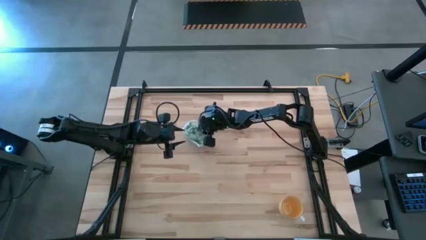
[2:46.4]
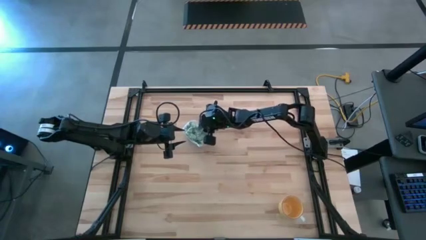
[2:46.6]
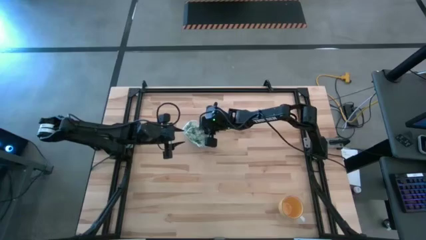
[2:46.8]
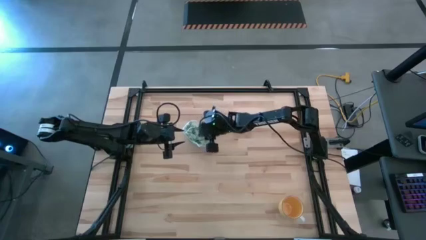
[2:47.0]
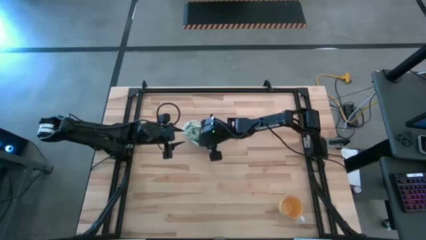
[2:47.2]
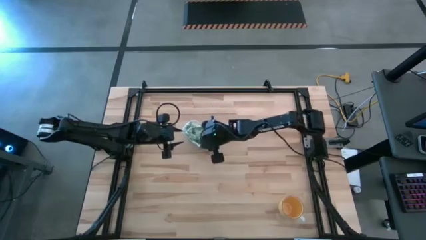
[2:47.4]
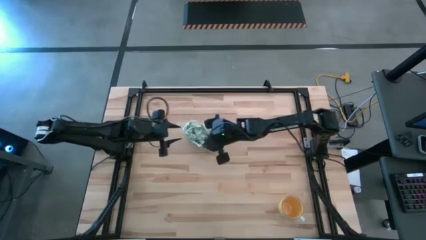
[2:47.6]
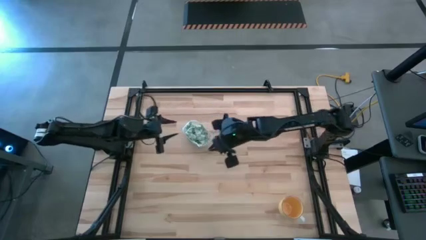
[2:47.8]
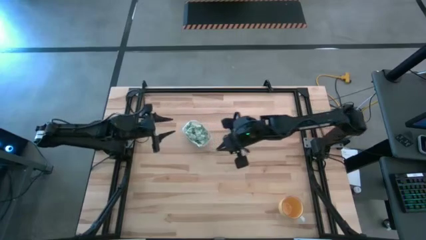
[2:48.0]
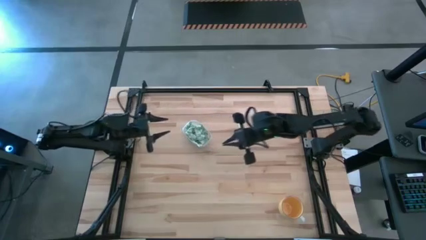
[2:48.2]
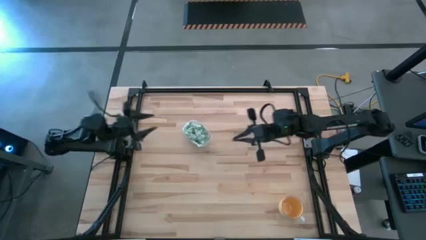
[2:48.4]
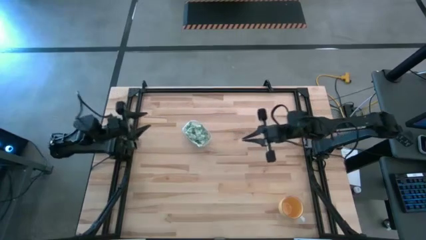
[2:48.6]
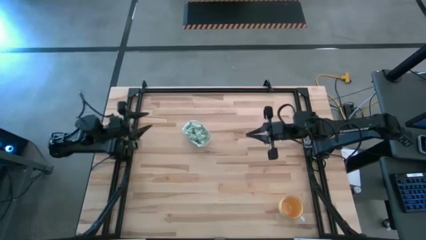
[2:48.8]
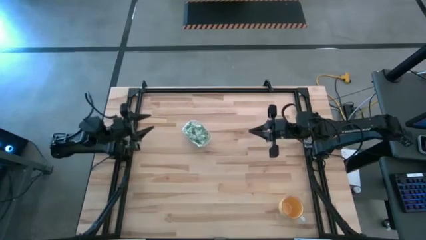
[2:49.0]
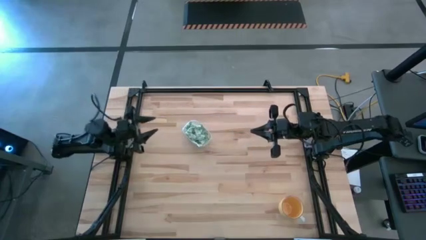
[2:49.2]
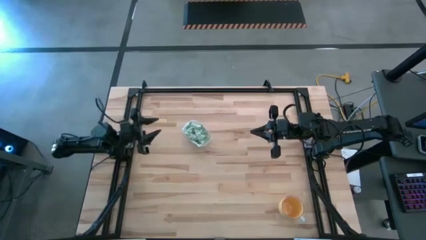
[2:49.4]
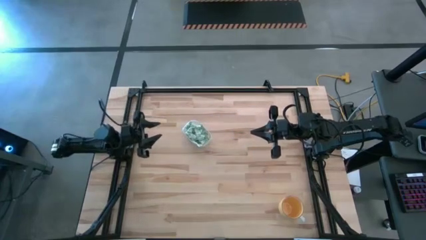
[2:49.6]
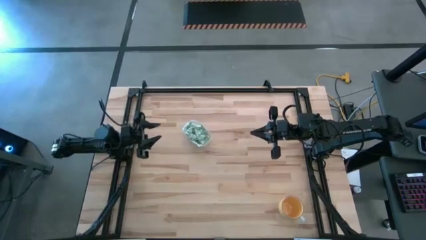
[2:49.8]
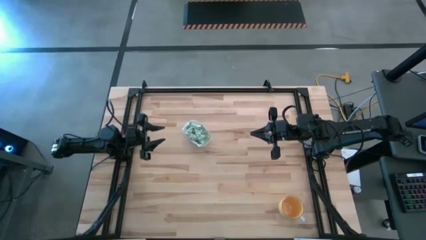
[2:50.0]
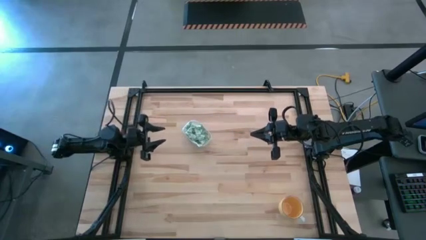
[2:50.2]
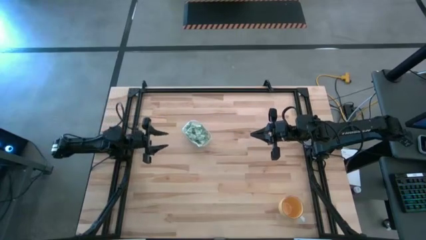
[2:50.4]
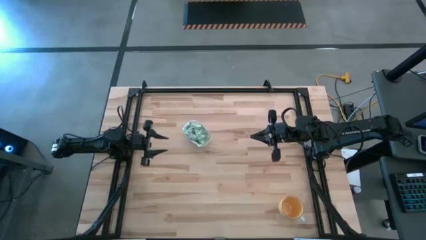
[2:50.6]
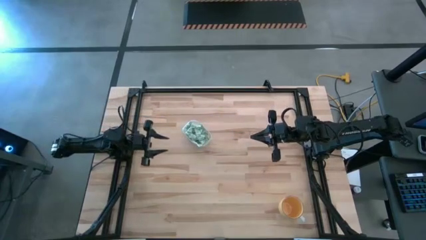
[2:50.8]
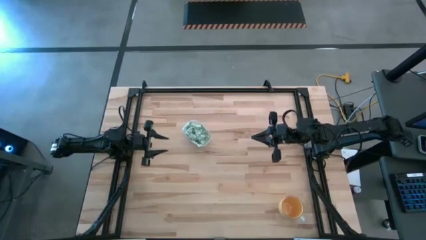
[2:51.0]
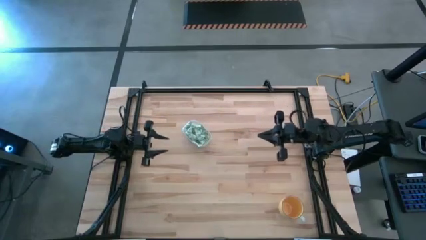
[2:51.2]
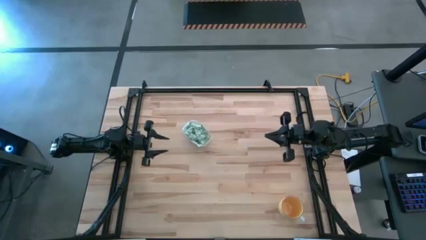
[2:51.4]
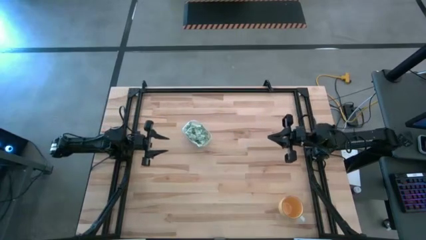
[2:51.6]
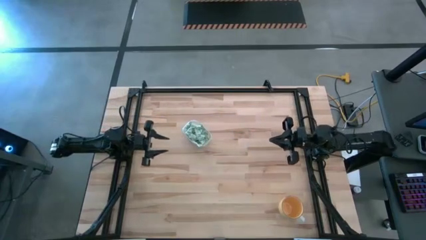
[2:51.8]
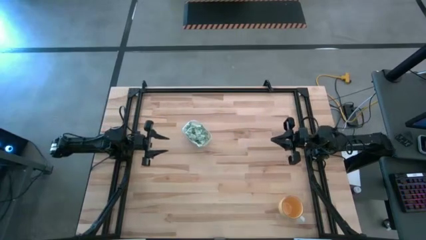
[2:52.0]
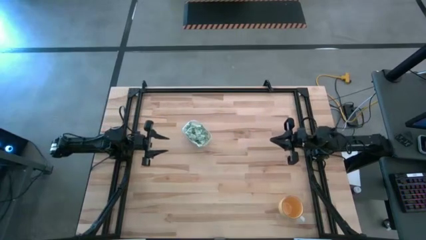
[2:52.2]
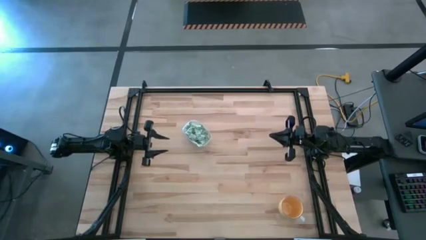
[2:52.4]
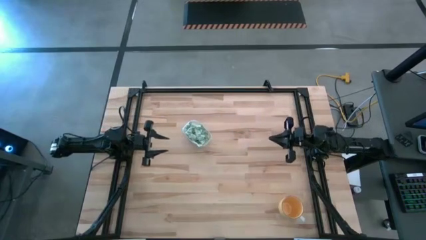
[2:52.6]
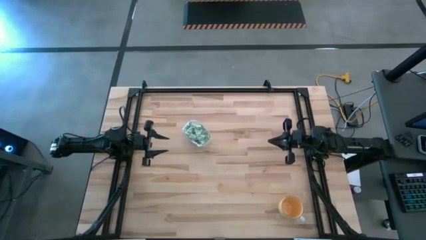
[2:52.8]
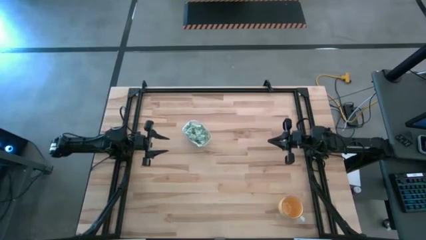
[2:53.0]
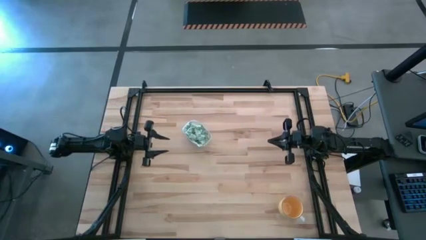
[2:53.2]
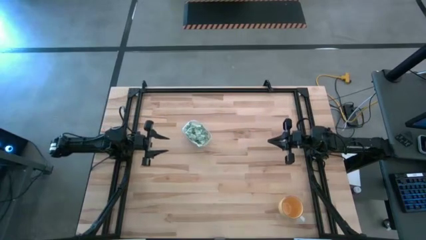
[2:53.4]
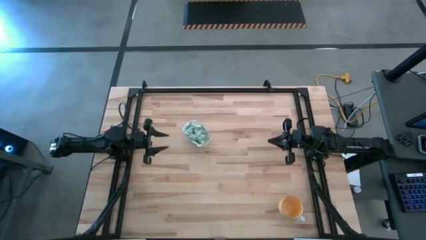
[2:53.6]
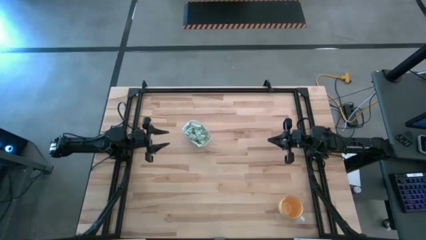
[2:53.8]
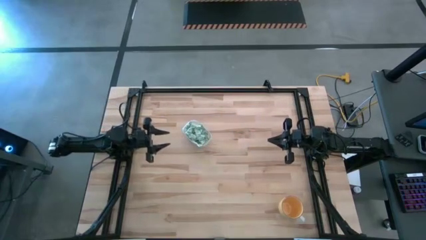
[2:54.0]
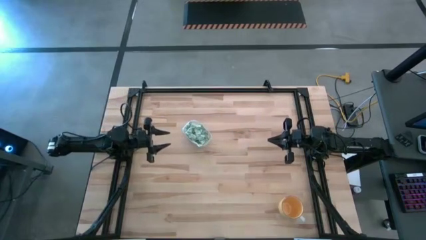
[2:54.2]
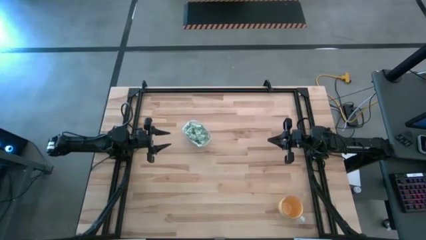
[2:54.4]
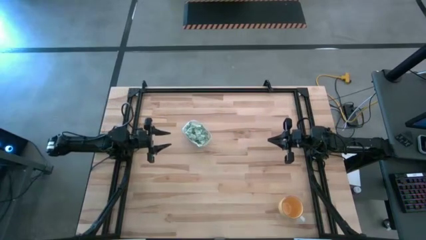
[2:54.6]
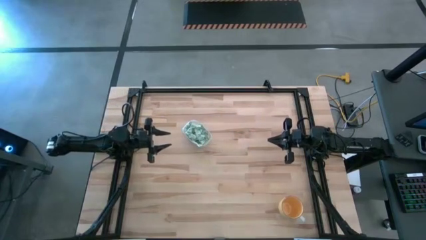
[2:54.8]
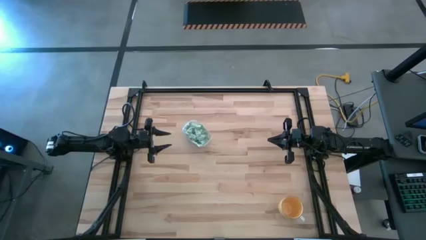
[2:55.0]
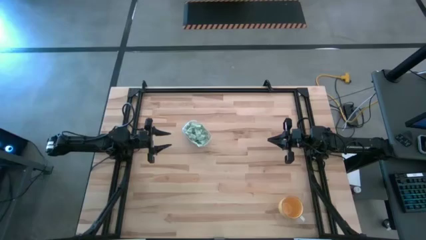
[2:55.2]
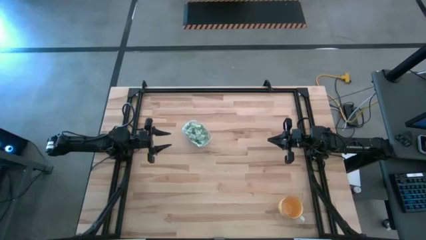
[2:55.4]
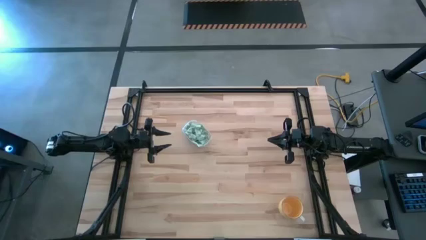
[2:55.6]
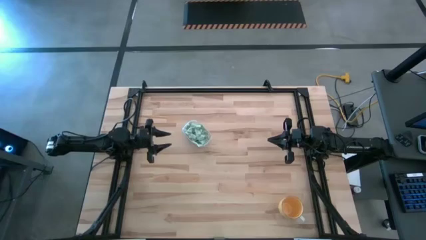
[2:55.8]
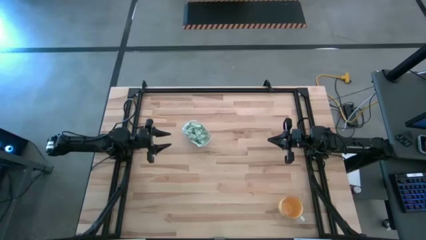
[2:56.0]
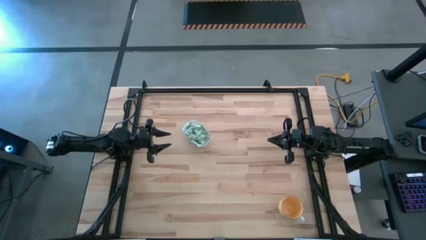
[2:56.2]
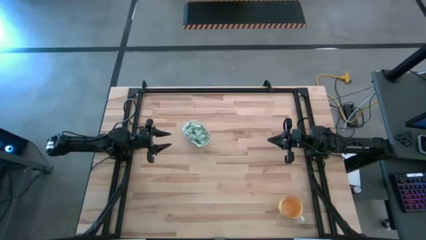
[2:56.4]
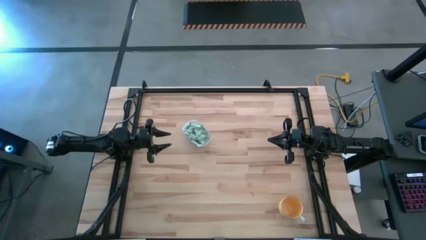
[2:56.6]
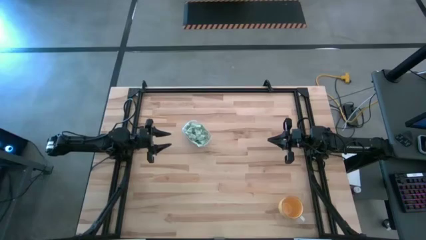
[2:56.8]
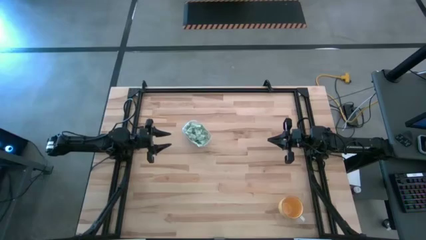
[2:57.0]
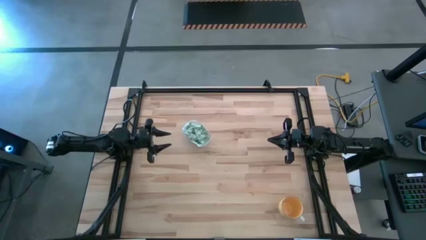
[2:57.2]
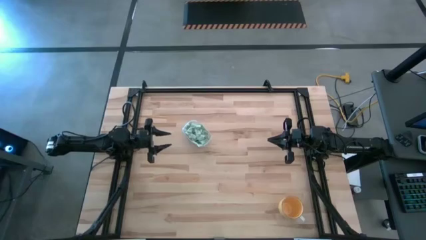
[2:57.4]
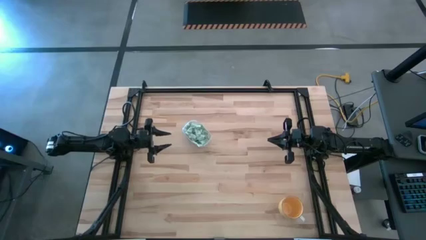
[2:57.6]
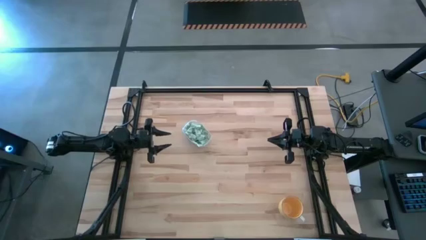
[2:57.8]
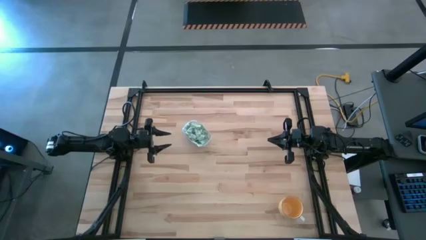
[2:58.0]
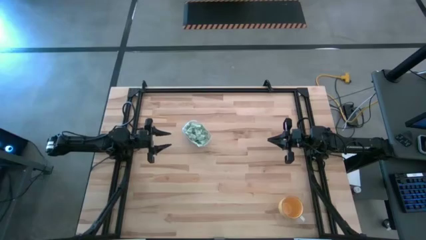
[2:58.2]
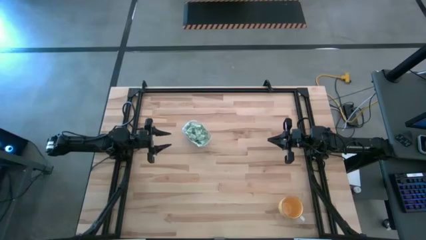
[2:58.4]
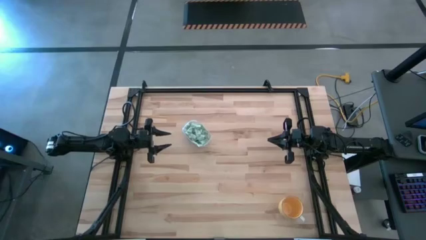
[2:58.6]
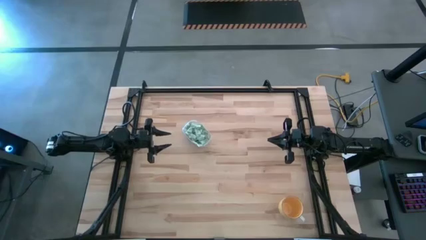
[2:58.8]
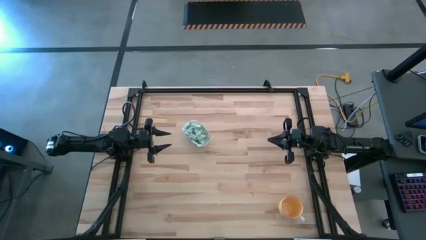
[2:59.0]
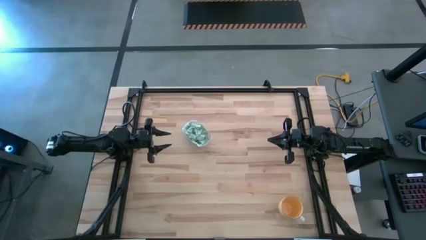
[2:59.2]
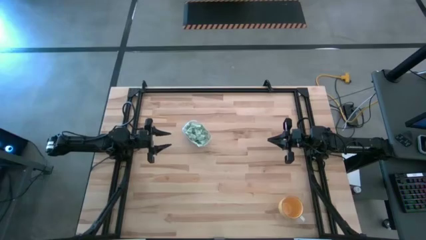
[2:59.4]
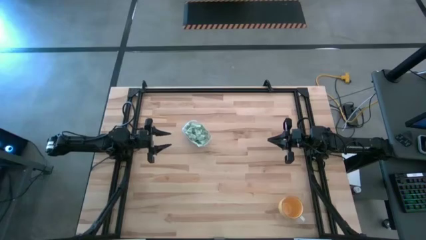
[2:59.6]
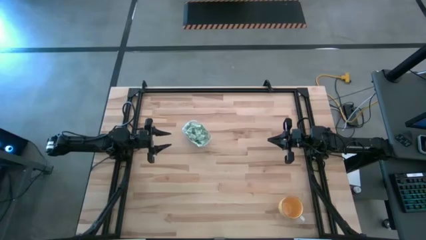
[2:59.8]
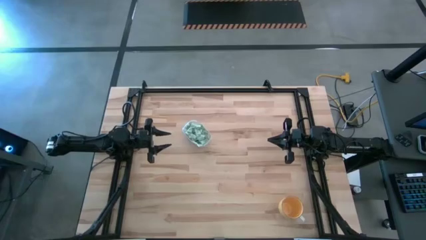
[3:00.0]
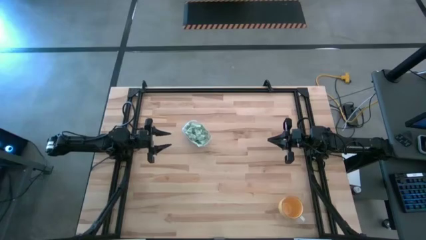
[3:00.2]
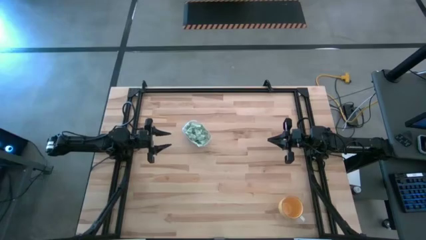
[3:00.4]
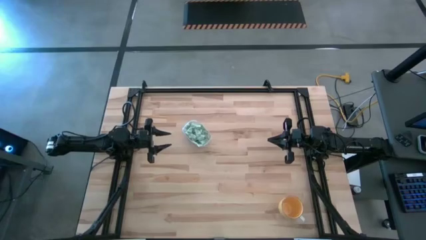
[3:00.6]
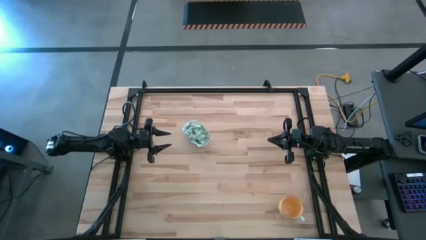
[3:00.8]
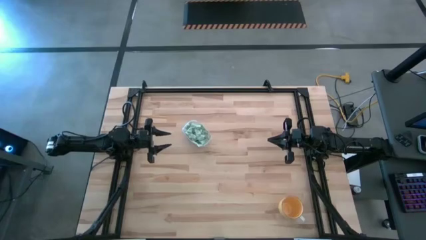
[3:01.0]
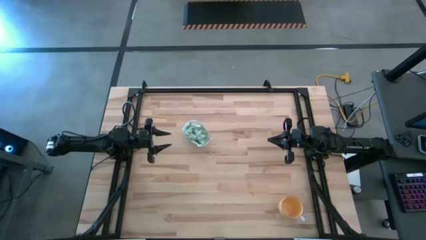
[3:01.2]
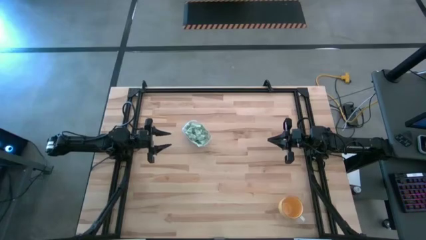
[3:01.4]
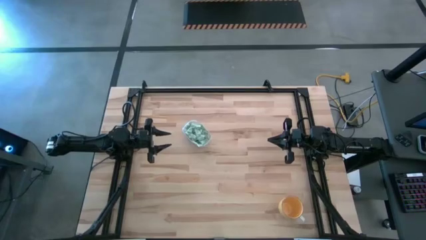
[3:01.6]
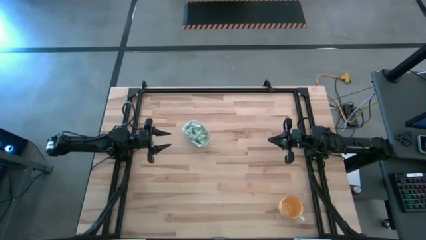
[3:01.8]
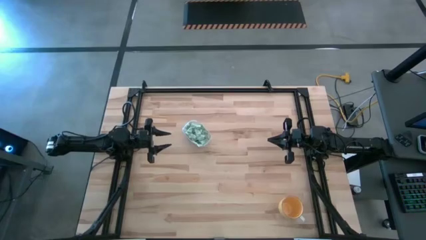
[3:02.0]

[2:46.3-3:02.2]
Task: Pick and place Stevia / Truvia into bins
Return to Home Position
